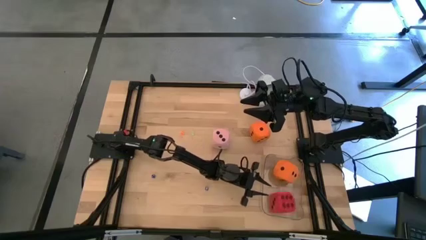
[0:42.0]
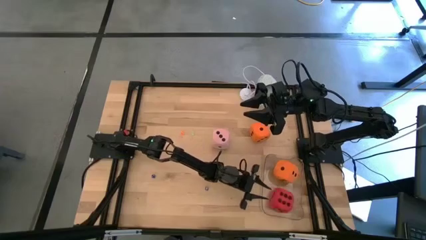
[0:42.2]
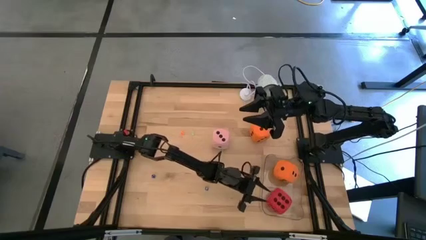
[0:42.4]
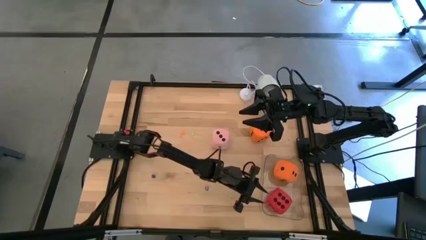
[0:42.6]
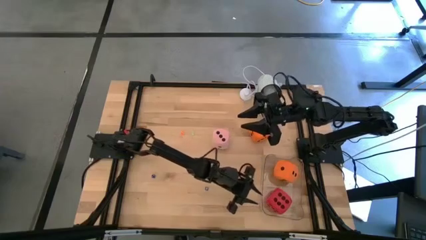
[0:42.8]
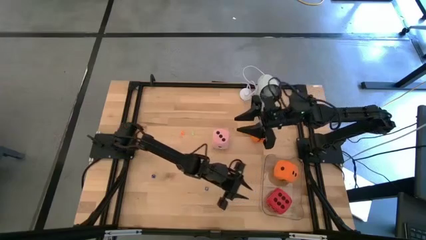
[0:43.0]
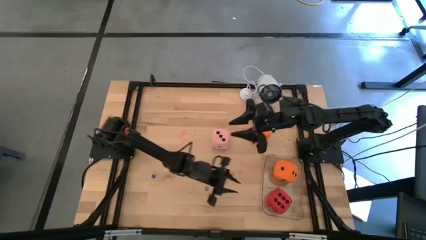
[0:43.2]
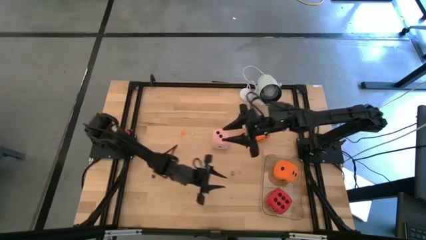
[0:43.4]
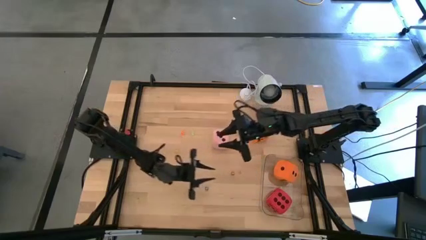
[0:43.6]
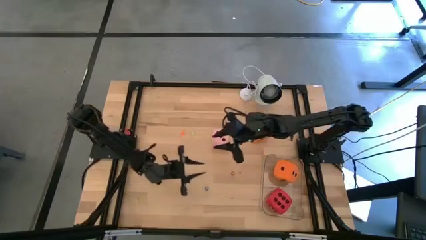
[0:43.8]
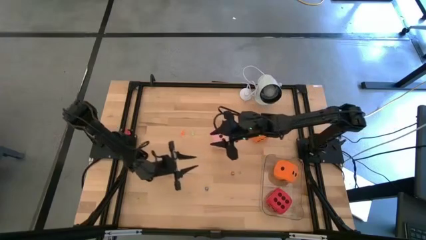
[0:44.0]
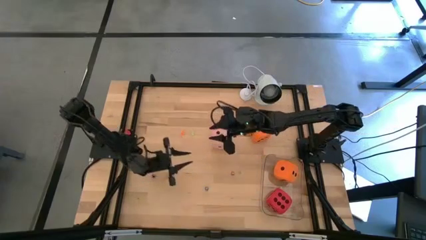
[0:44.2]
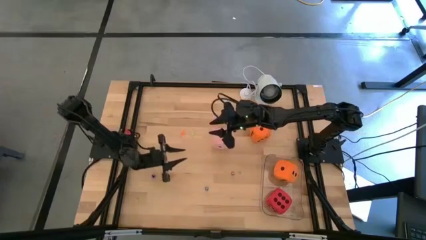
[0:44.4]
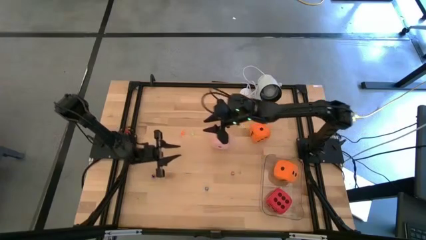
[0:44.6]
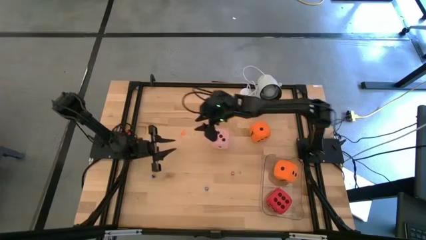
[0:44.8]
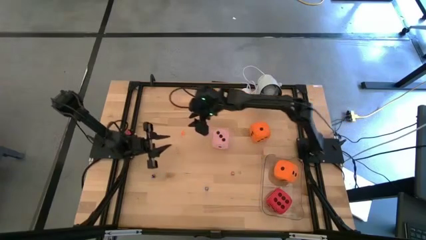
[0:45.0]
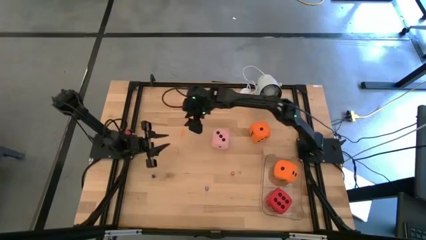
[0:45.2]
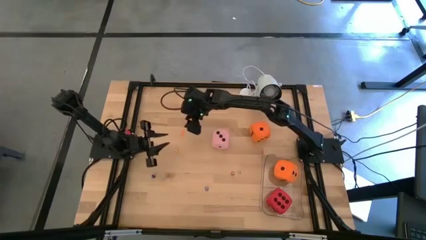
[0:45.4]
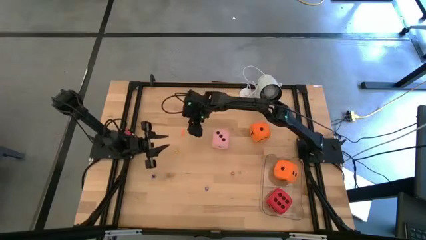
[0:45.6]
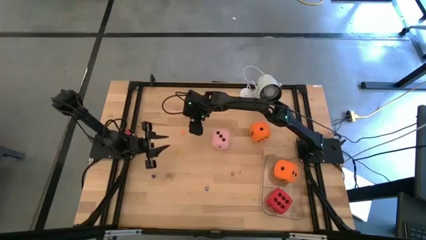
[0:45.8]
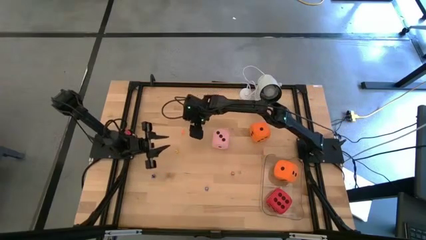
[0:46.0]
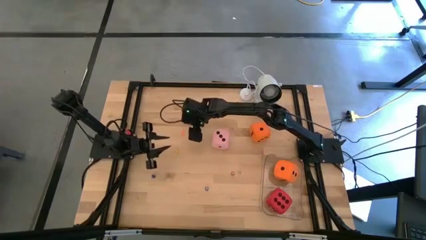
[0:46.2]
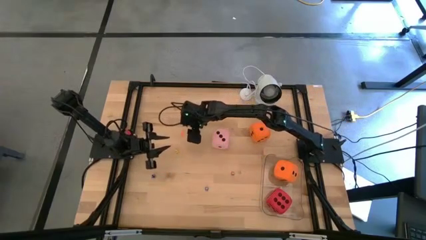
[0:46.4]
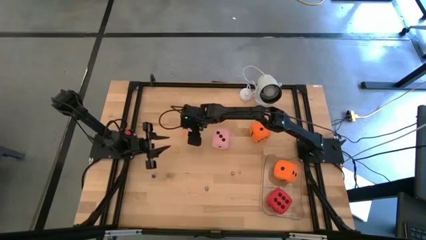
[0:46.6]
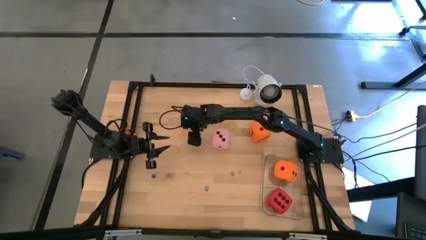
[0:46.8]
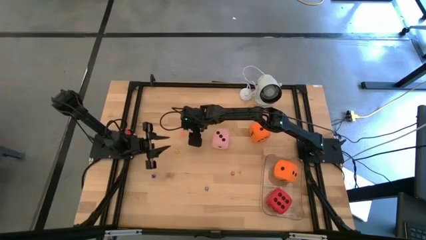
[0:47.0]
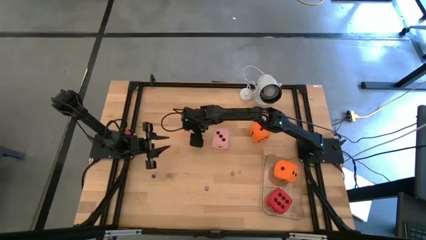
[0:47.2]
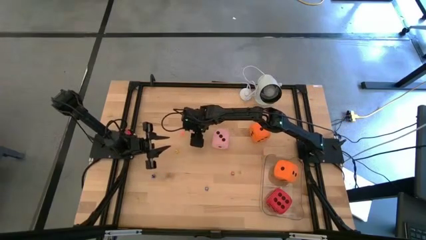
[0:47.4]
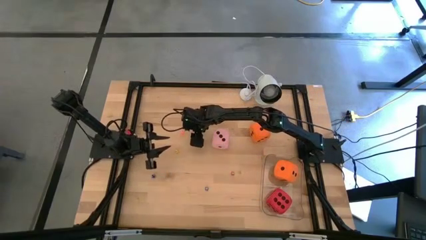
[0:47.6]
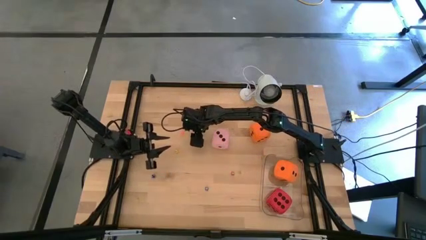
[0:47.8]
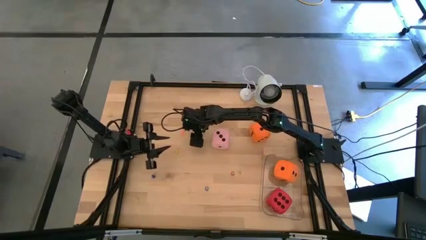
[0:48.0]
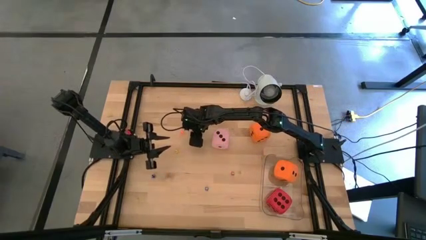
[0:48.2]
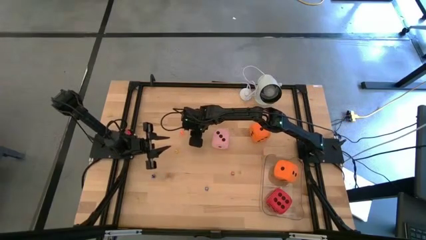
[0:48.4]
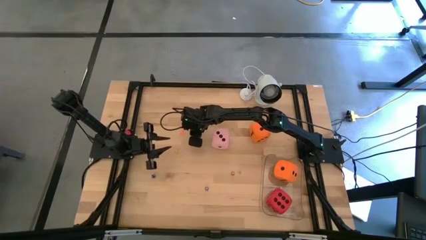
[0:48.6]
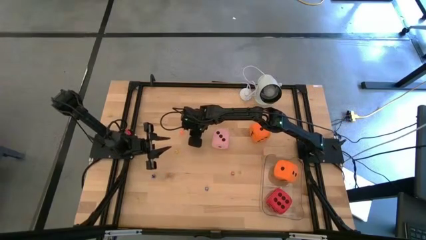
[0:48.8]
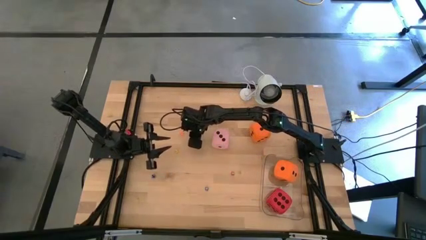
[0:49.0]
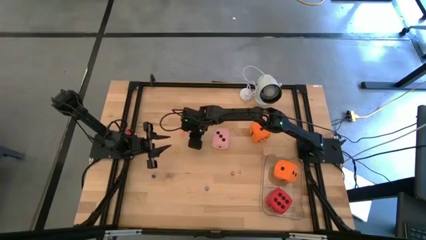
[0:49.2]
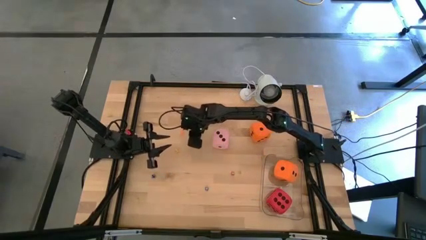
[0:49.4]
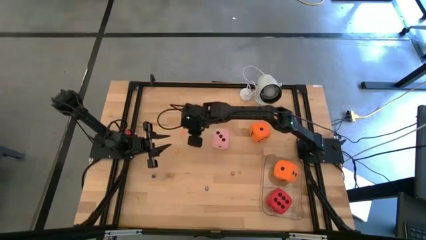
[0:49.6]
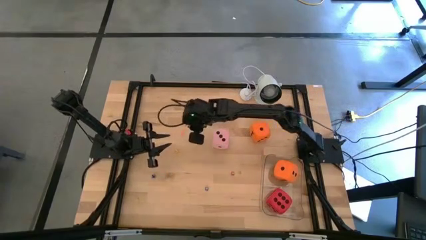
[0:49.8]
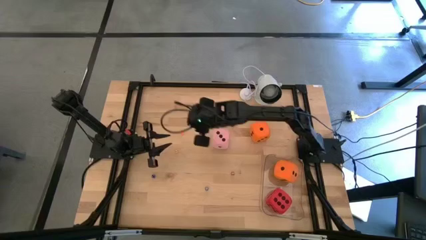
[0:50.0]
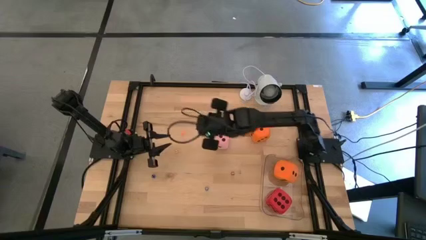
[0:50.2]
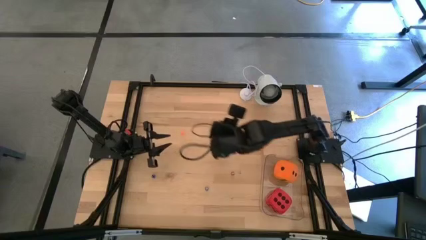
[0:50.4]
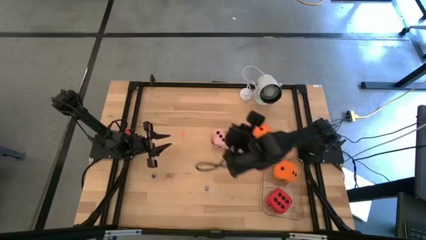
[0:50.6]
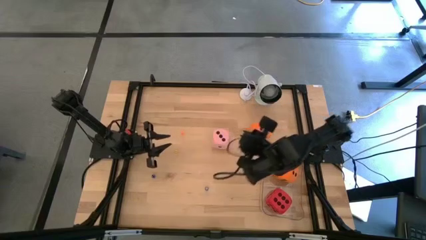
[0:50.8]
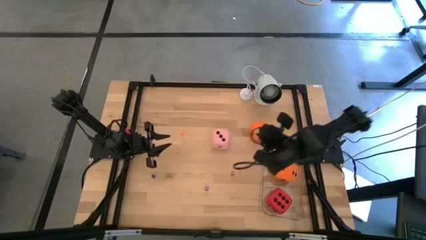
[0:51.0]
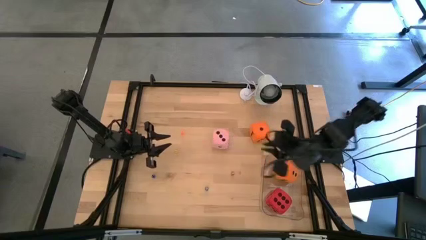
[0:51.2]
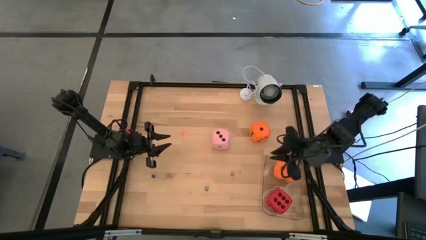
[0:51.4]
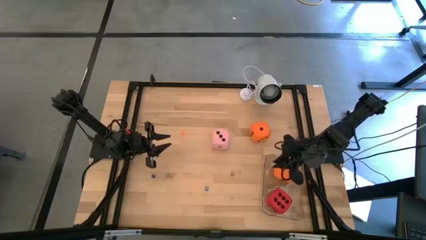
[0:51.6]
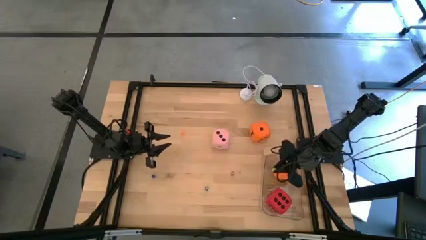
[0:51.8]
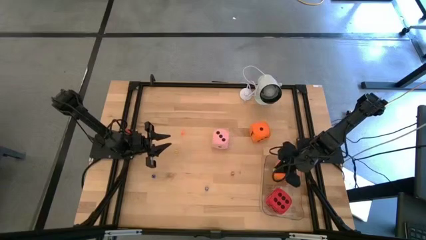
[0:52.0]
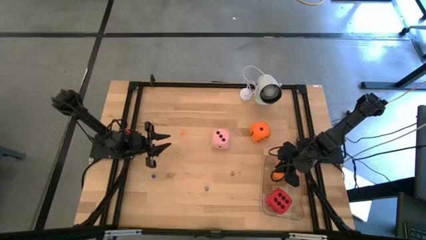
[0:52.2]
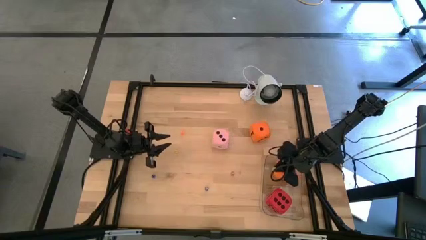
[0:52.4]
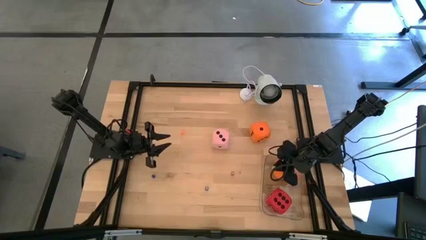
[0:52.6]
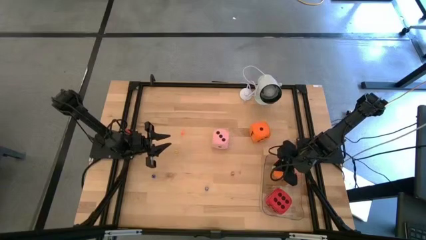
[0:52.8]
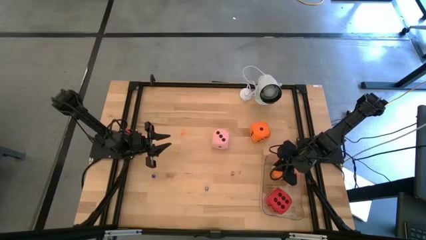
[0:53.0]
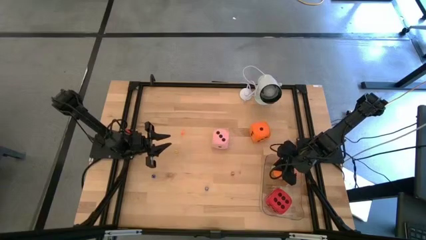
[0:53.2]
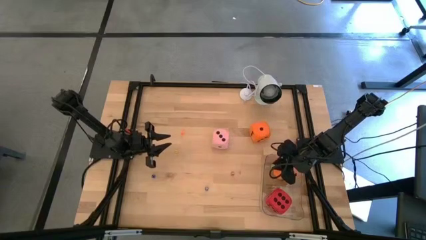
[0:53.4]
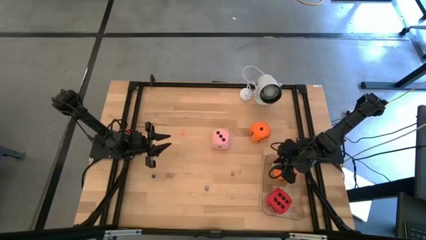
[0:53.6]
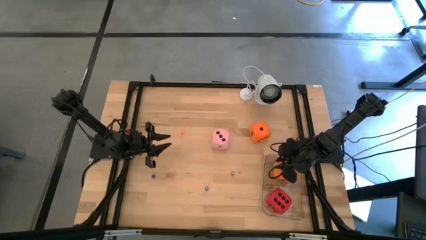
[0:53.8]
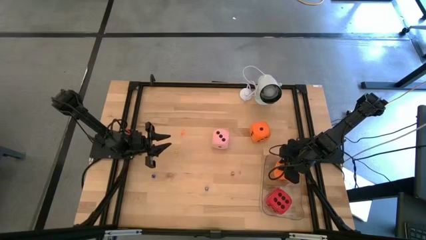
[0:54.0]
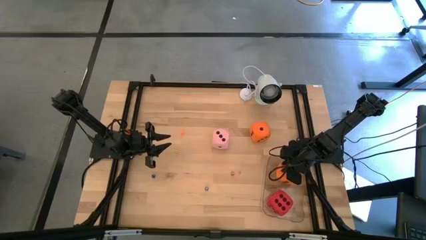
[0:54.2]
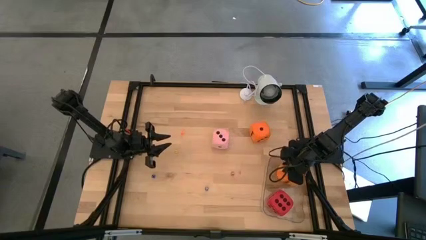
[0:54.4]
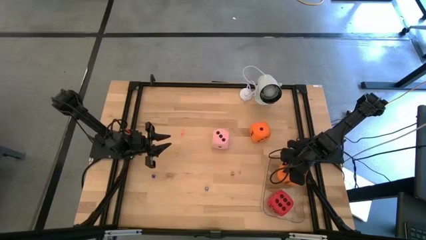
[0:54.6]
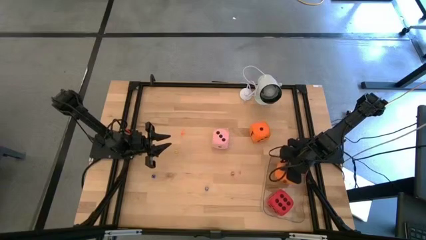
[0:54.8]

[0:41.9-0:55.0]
Task: Pick & Place Dice
Put the small green die into the transparent container
